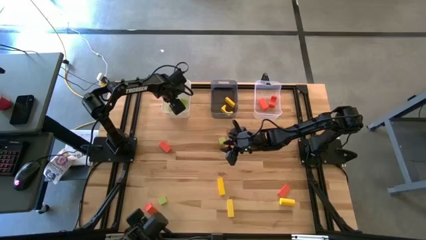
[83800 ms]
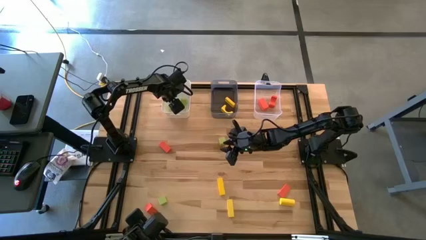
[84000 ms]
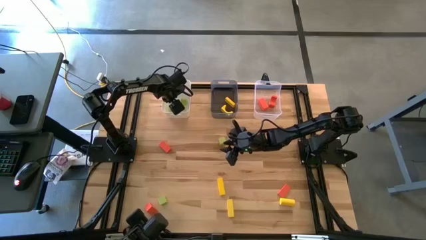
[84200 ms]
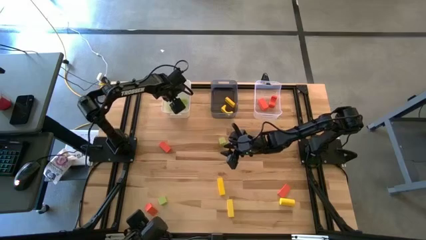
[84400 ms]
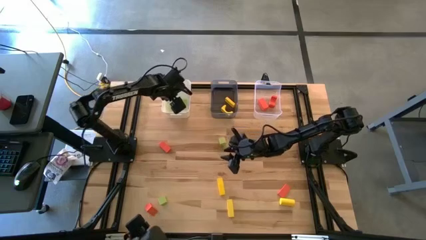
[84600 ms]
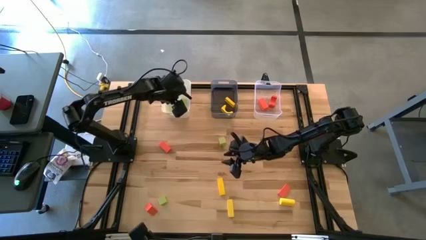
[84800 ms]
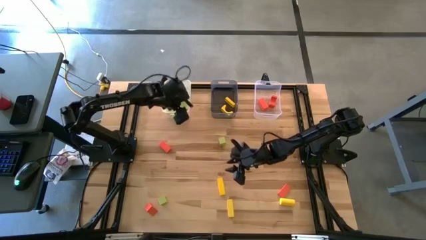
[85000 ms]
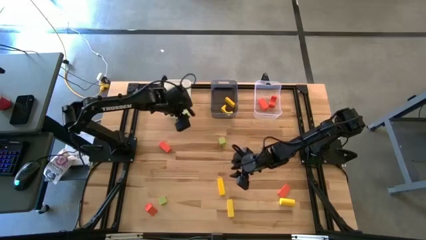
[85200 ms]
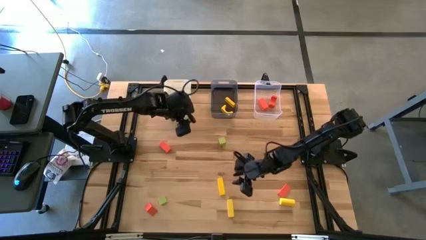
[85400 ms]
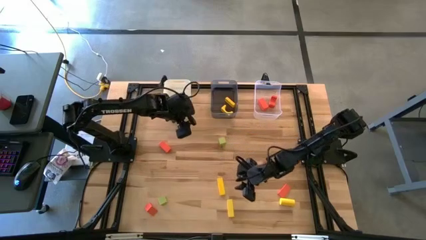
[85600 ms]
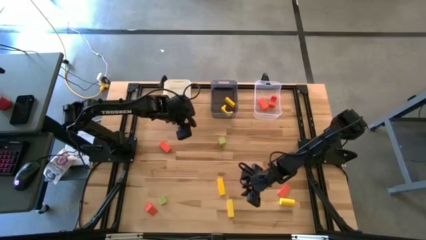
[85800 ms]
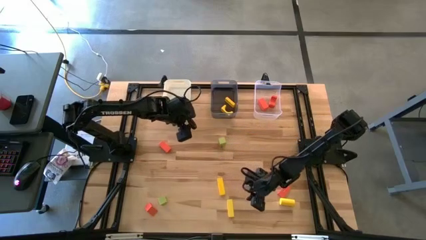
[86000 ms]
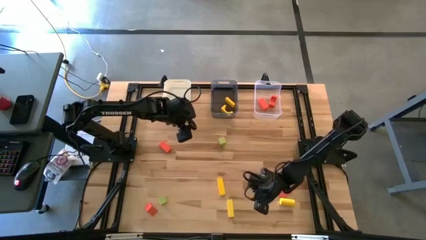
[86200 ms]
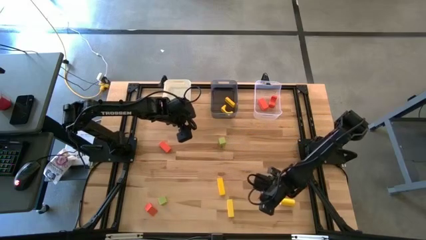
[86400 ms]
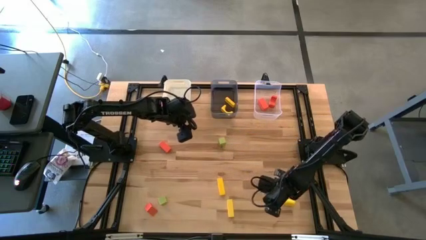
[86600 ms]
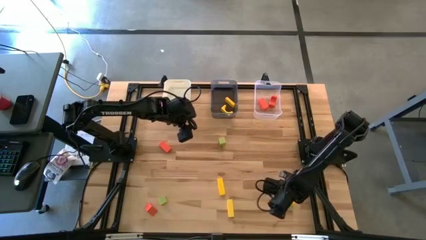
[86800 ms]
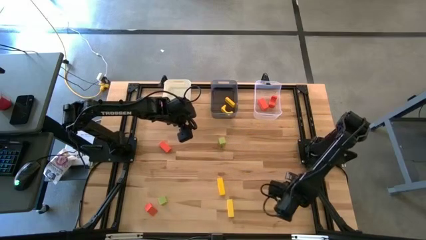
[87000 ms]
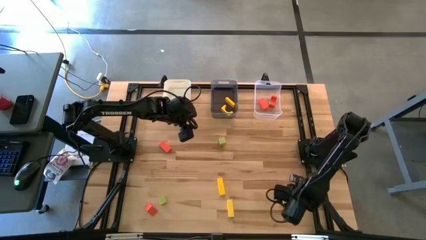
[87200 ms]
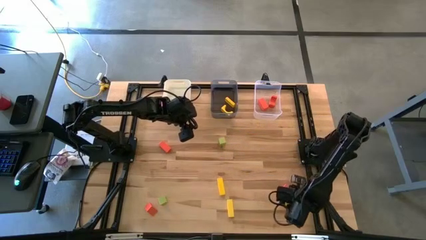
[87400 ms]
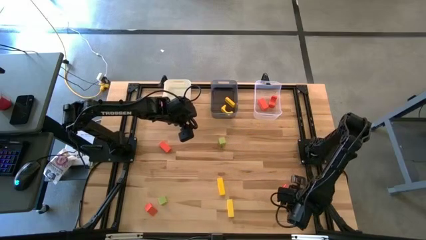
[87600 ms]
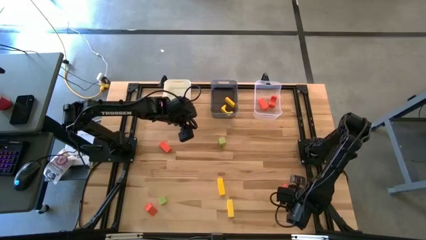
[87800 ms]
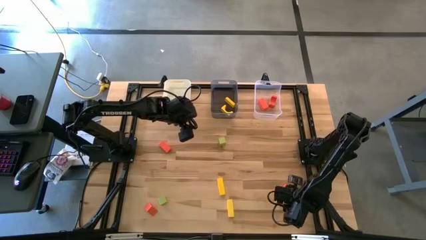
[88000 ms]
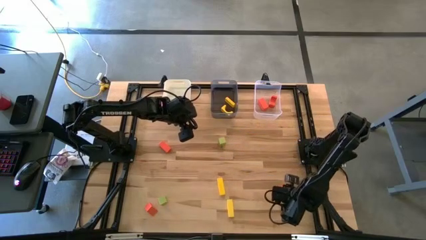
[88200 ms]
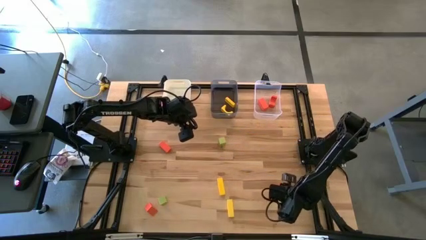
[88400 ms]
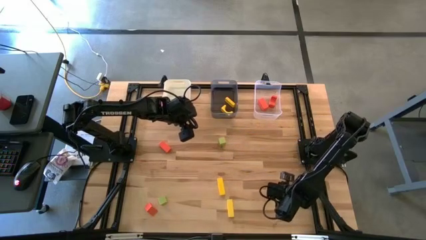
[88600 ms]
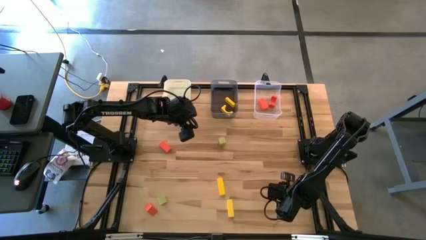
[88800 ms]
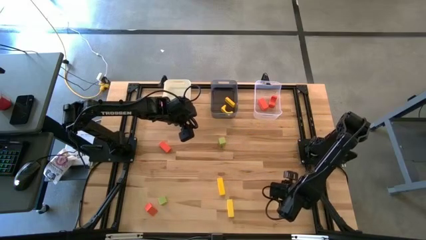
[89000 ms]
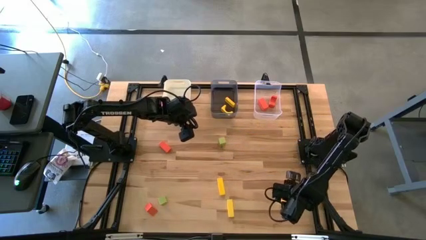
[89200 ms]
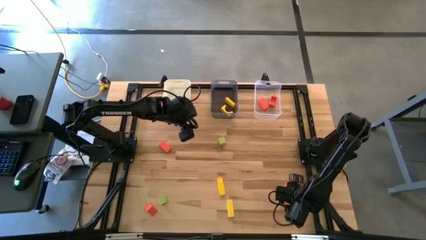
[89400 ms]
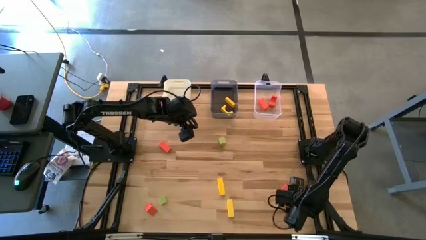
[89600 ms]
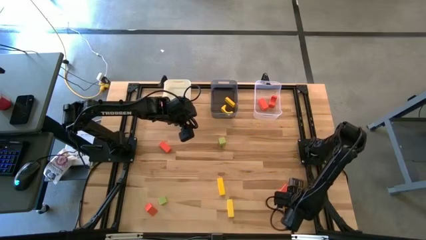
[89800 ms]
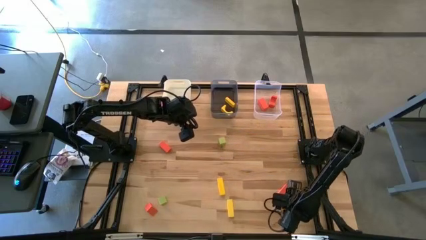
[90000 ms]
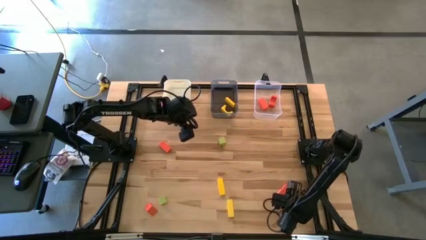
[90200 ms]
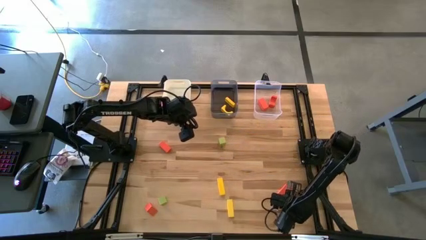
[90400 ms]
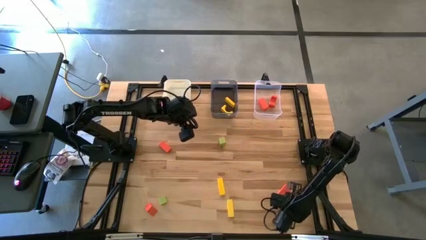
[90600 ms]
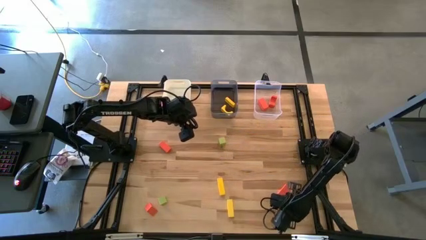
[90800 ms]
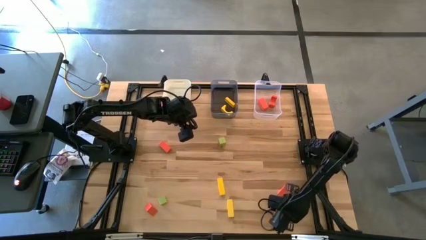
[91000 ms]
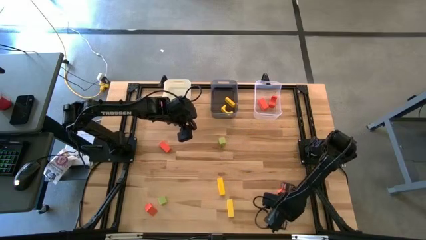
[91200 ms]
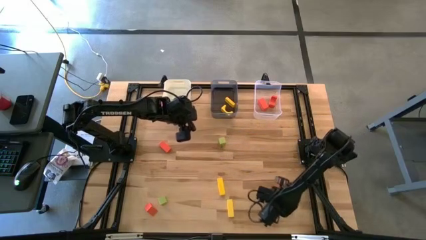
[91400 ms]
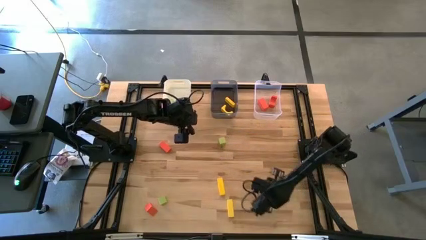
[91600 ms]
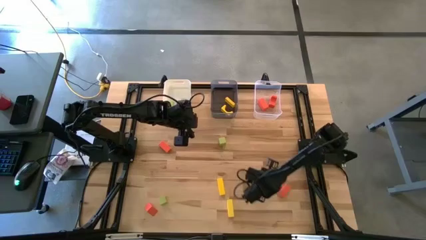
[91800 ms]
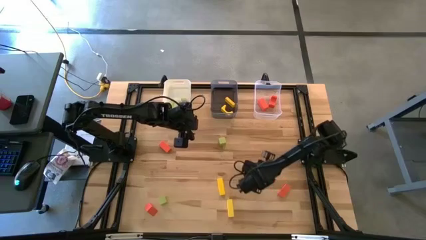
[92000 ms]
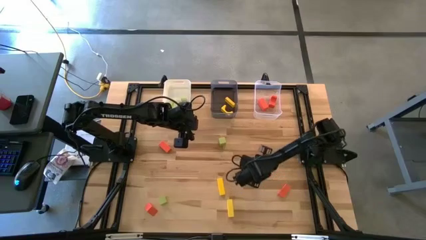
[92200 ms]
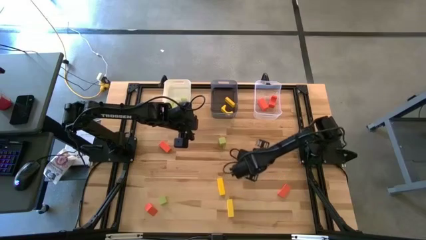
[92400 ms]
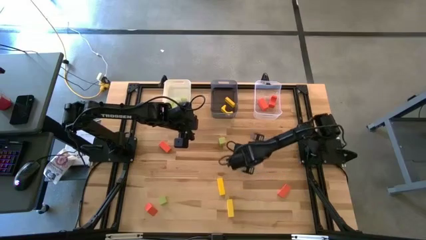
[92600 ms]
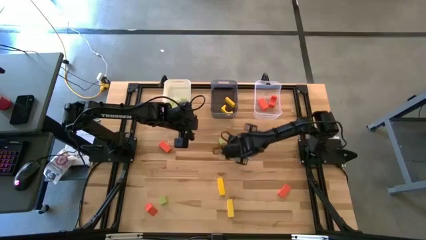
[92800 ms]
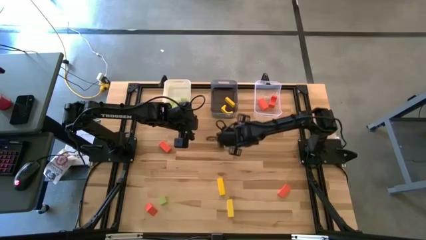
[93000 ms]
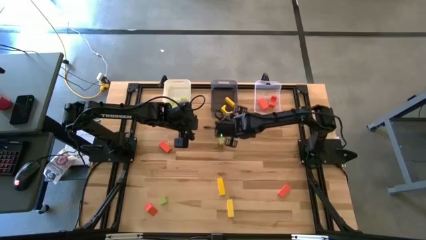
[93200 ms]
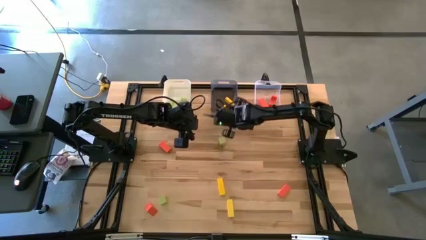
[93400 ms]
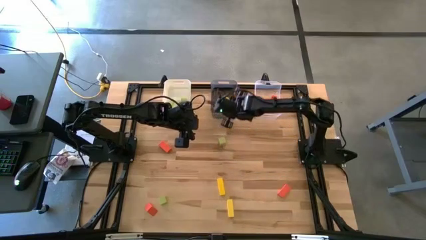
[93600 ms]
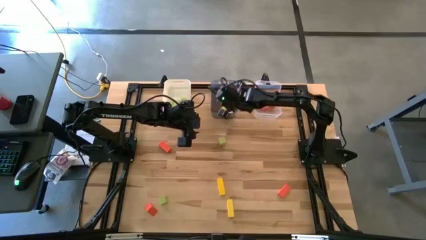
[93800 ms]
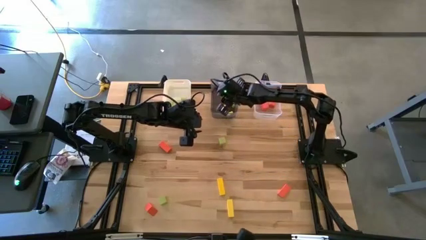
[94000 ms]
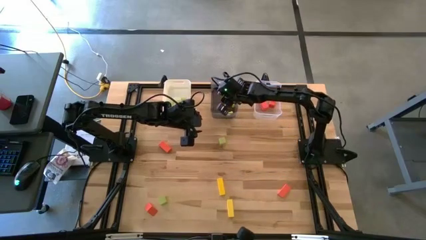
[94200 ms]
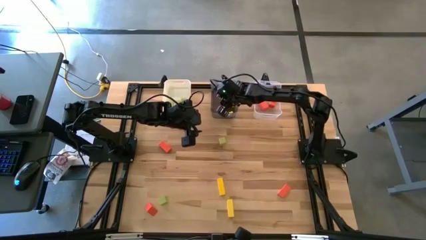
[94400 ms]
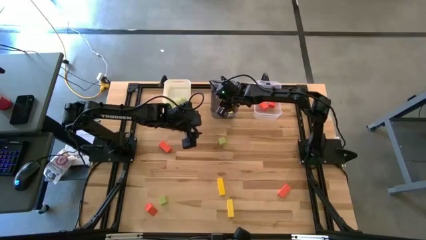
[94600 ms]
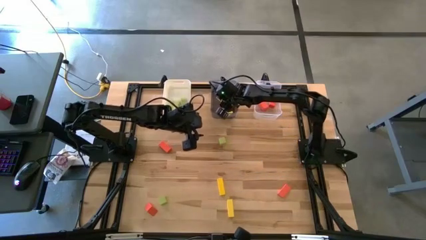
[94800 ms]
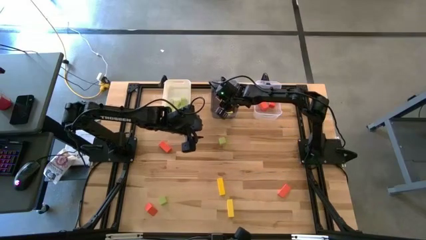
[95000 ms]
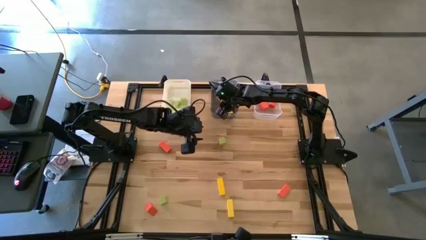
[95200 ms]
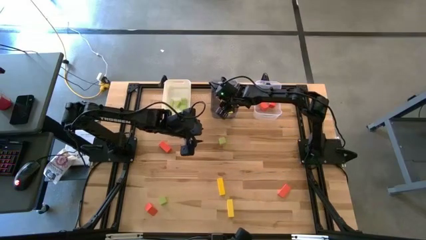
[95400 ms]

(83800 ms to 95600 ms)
Task: Sort & place blocks by color
Put the yellow block into the black bin

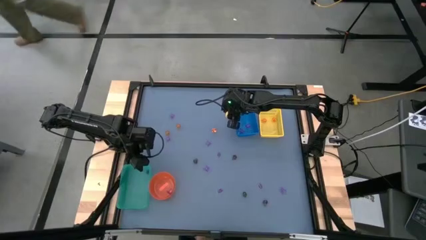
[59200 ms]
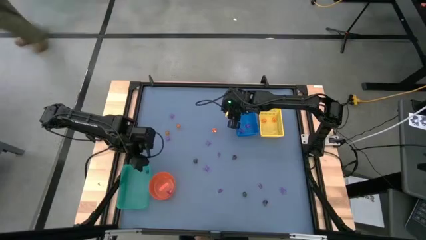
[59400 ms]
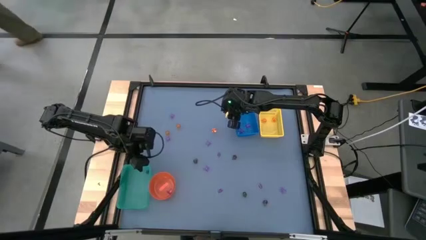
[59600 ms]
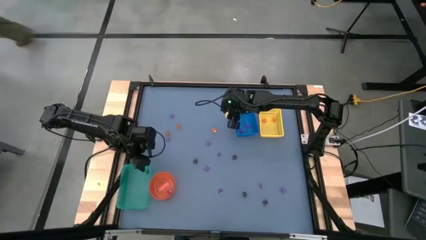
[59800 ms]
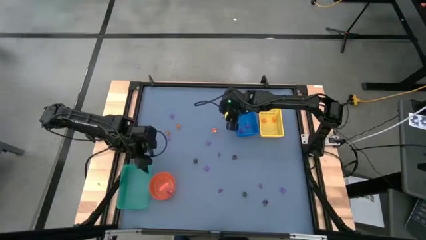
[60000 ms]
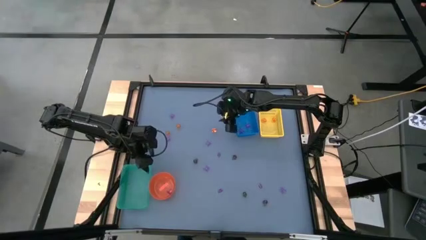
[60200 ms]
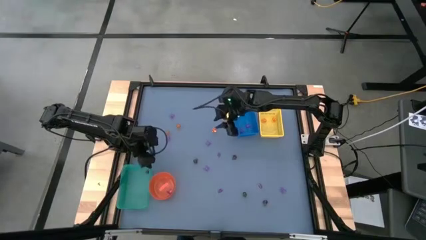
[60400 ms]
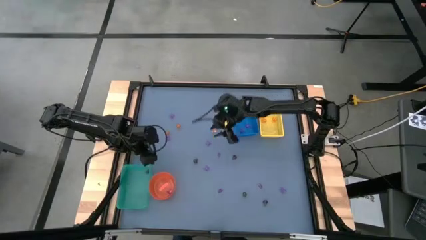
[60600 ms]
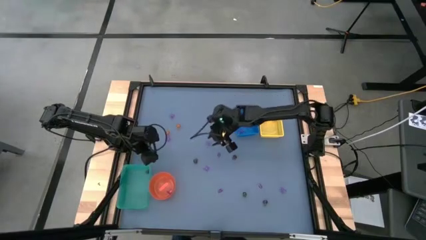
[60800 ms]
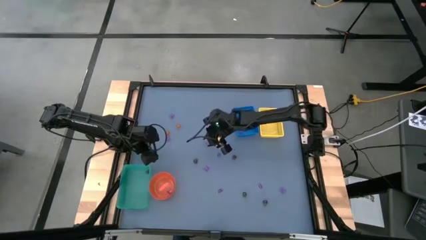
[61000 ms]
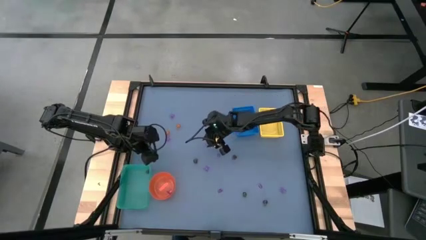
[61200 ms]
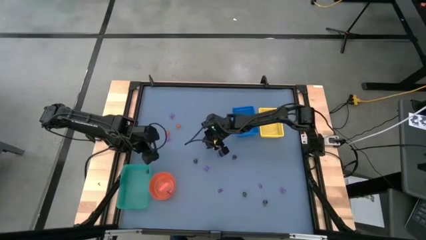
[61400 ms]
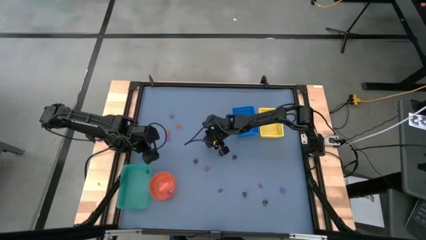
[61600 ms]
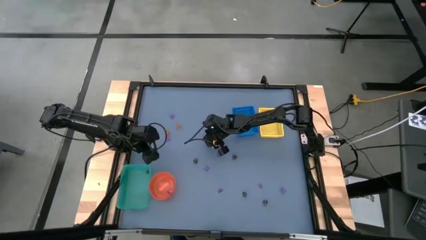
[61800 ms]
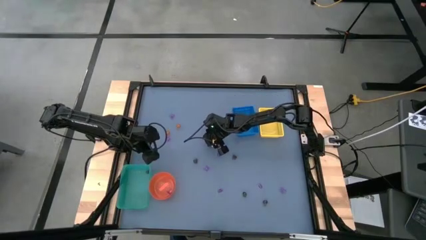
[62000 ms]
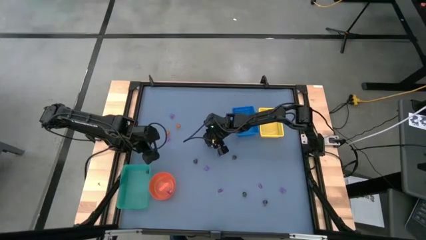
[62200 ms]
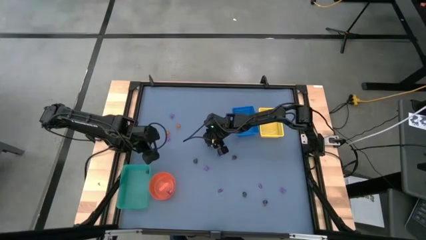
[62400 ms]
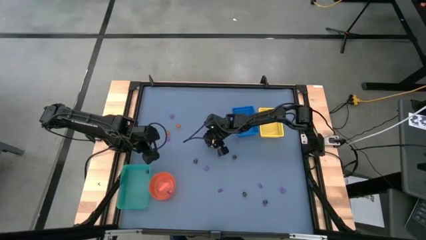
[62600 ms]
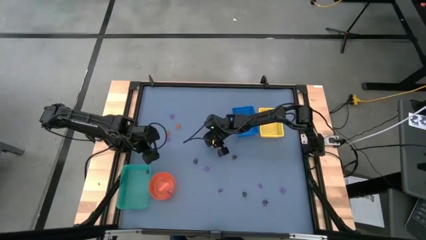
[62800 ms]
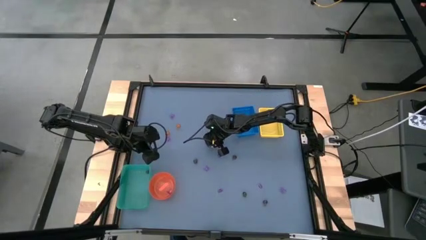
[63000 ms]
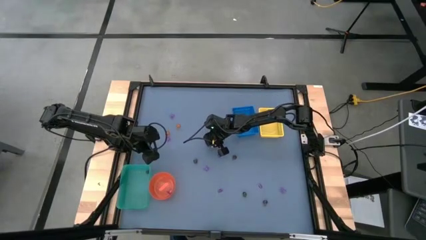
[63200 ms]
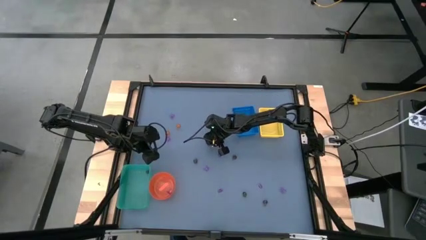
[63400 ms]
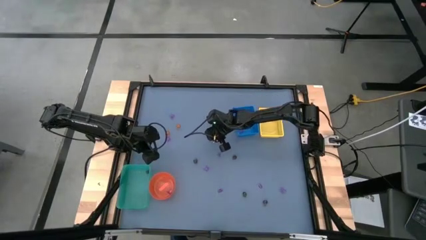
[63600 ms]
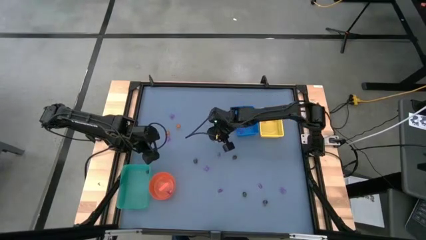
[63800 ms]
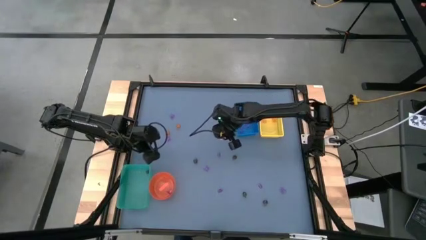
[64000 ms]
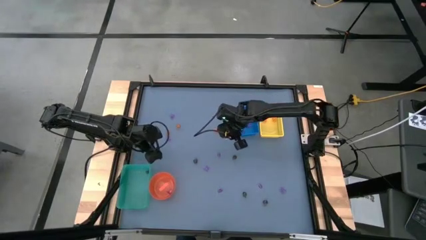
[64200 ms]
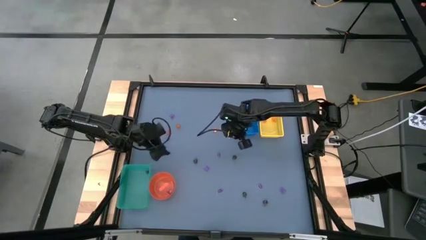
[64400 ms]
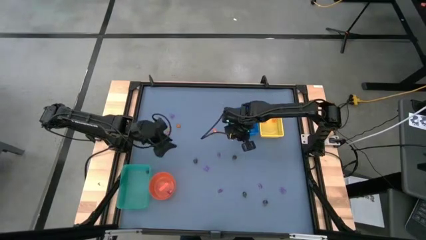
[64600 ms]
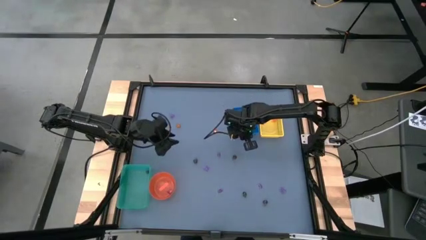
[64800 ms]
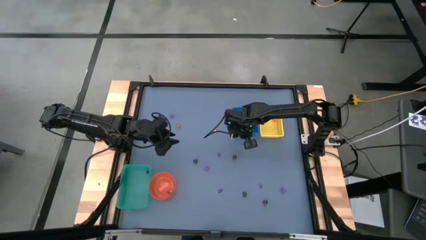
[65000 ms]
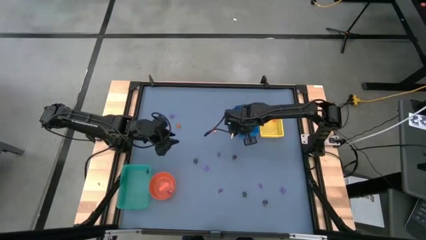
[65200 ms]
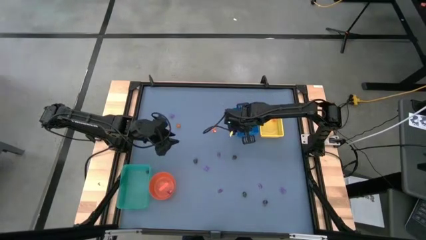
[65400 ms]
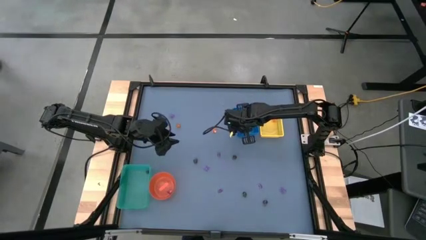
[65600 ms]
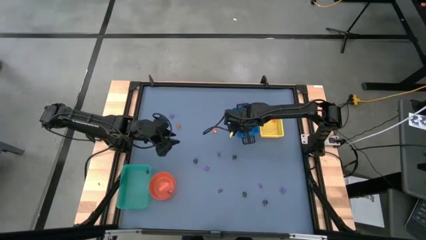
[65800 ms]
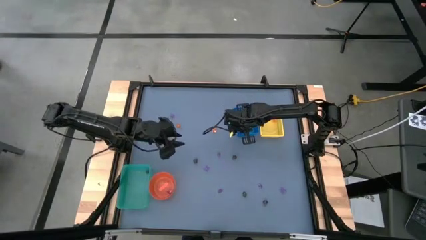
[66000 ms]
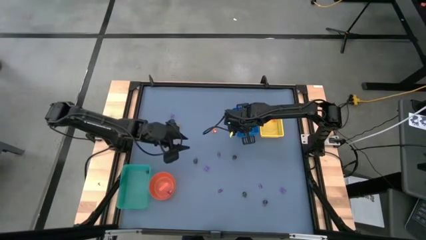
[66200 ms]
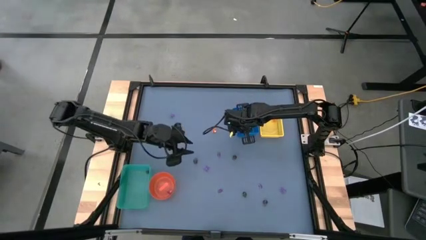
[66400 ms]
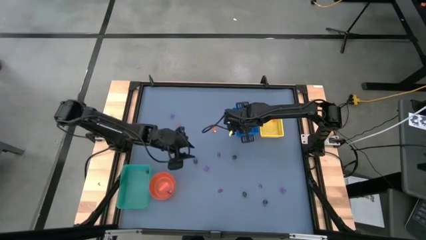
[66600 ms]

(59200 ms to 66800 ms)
Task: Sort Halloween decoration
Put the violet spider toy into the blue box
